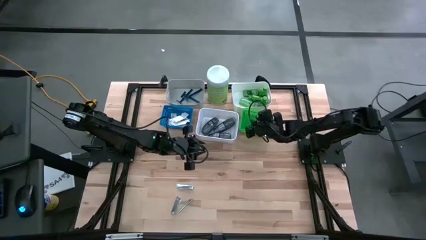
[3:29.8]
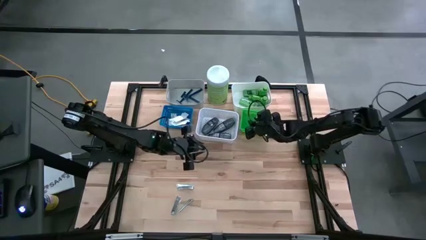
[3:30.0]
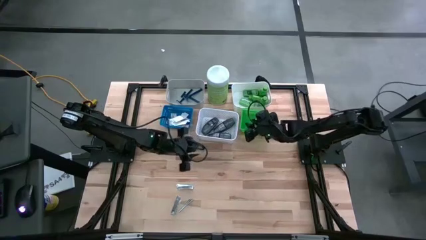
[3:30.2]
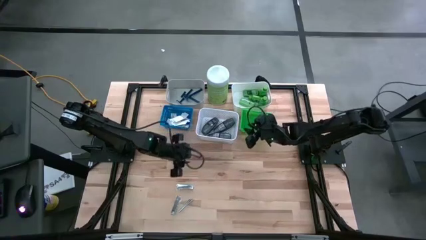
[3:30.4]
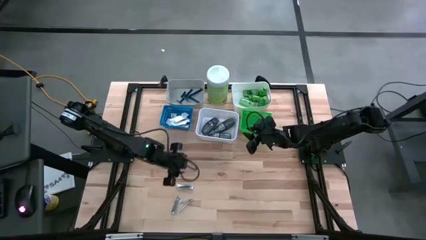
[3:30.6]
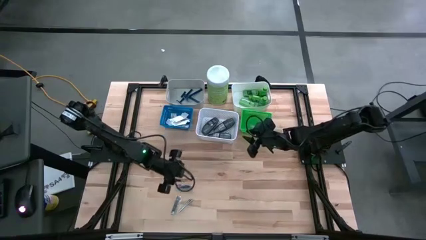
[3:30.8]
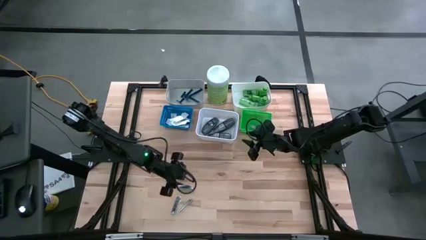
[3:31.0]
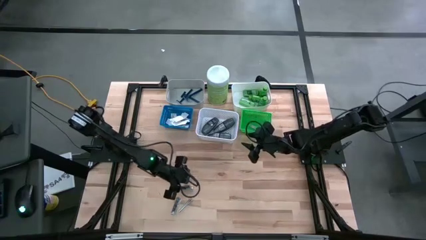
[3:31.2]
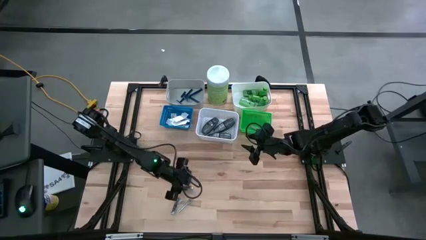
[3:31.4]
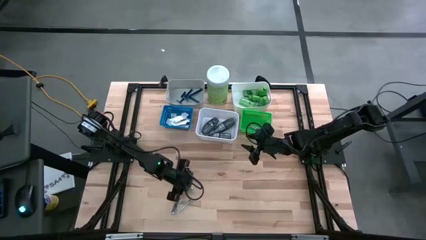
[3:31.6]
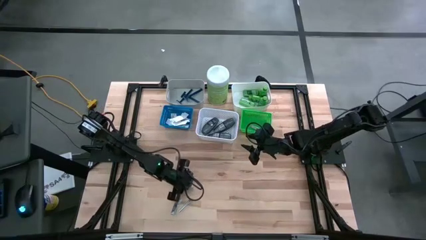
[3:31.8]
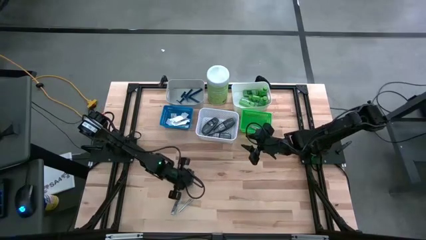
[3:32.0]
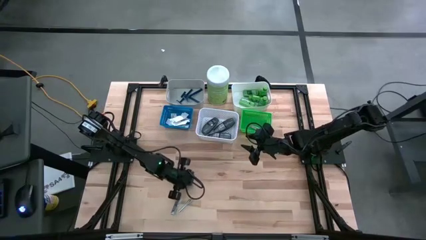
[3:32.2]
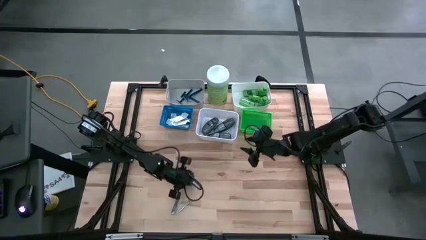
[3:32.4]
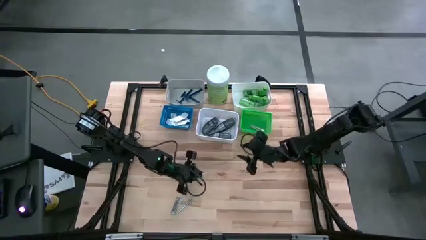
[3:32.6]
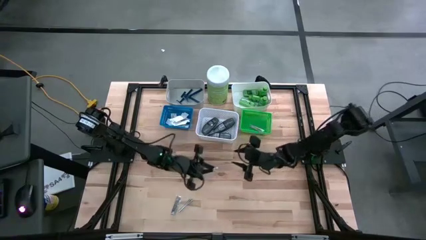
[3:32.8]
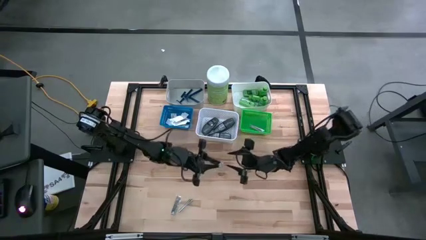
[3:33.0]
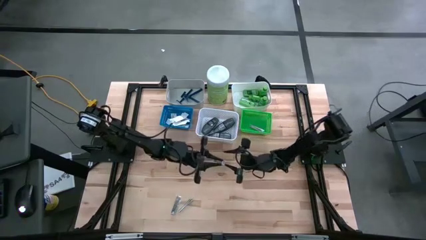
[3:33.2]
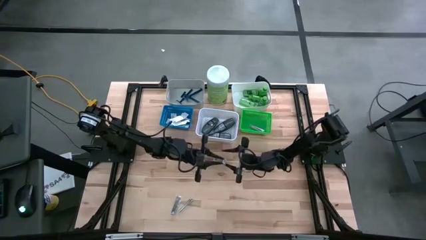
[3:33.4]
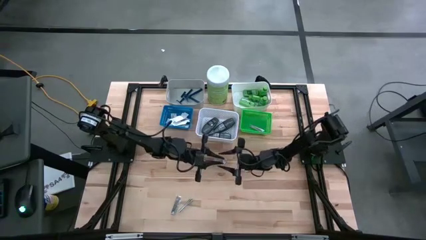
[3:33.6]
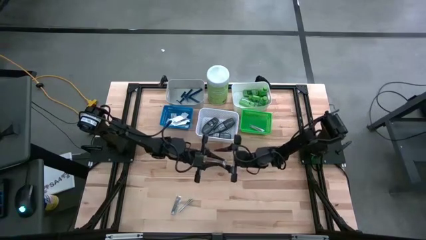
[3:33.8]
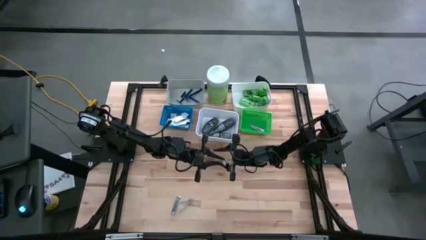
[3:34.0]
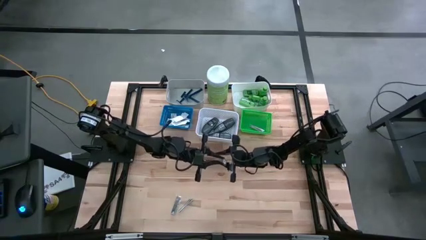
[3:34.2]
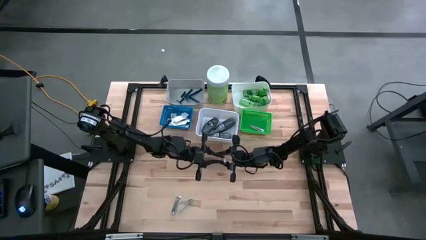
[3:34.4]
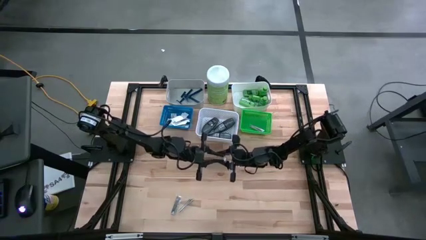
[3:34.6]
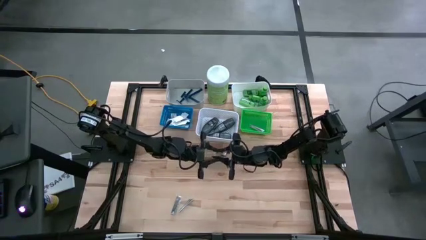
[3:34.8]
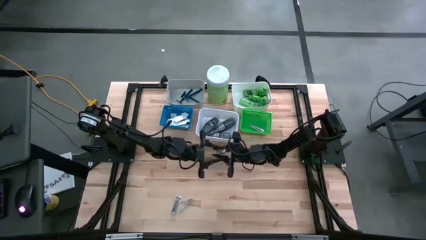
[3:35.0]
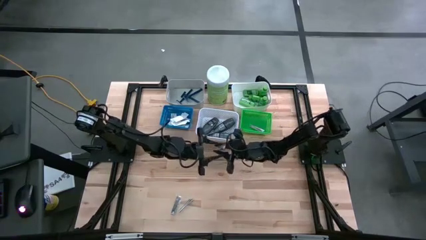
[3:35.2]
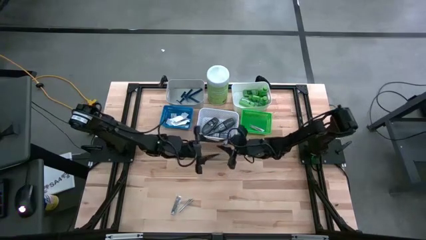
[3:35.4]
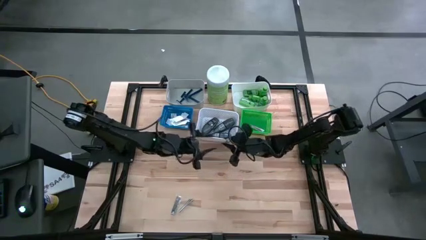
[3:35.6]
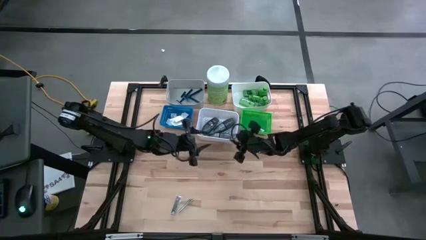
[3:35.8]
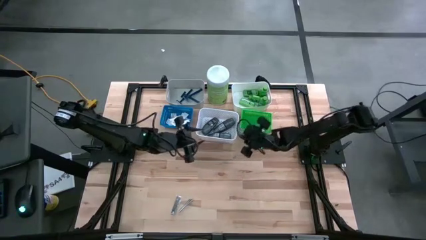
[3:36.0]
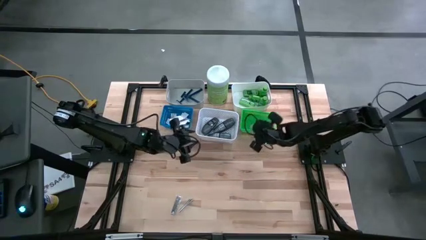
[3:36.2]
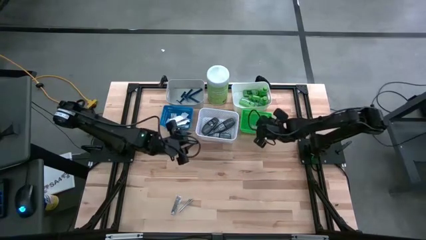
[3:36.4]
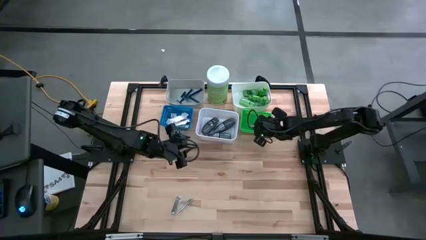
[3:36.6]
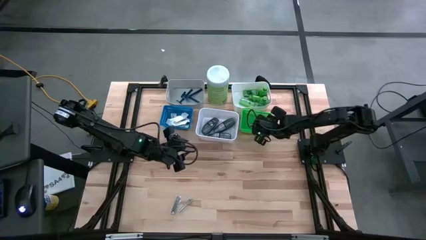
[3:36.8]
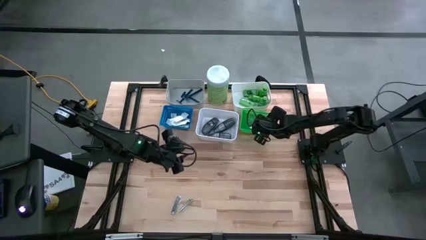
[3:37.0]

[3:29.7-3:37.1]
Task: Pick & Place Travel size toiletries
Put the silver nail cutter into the green bin

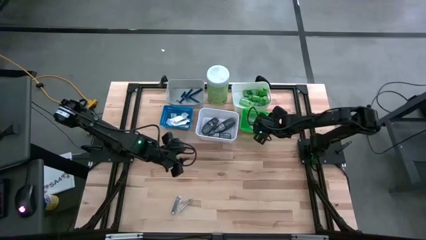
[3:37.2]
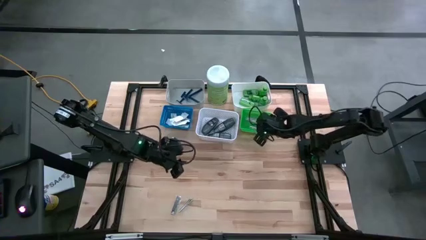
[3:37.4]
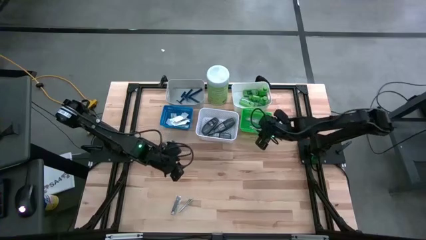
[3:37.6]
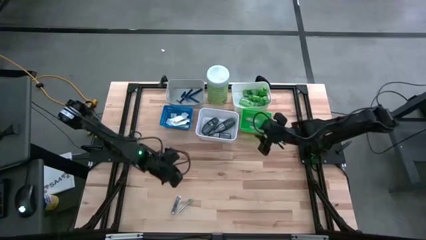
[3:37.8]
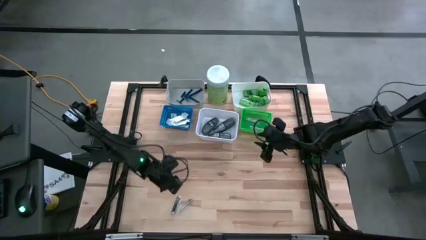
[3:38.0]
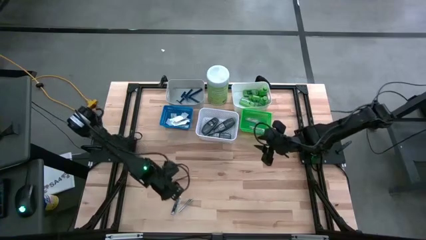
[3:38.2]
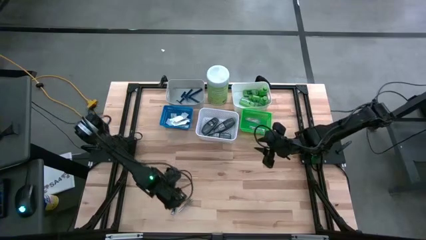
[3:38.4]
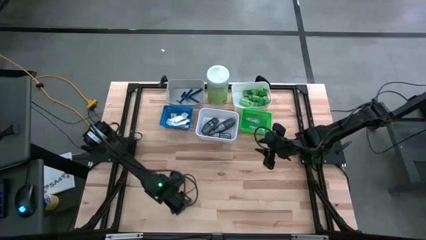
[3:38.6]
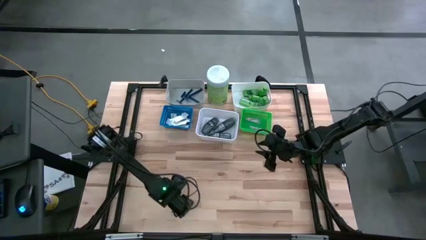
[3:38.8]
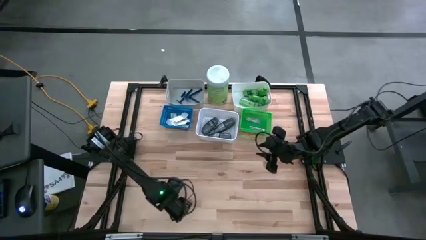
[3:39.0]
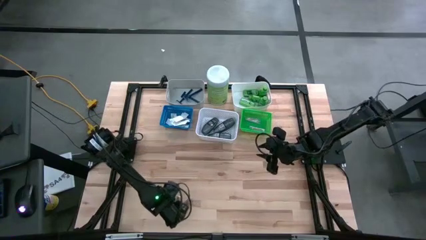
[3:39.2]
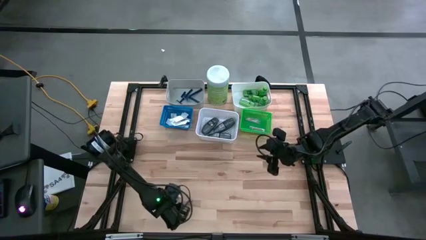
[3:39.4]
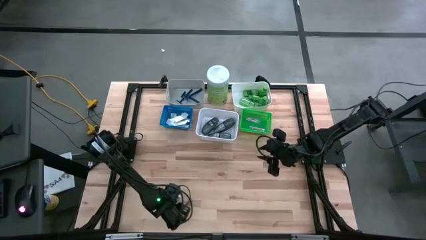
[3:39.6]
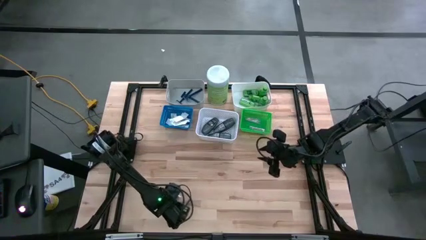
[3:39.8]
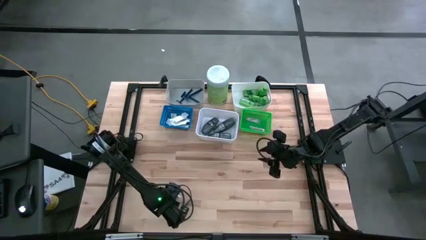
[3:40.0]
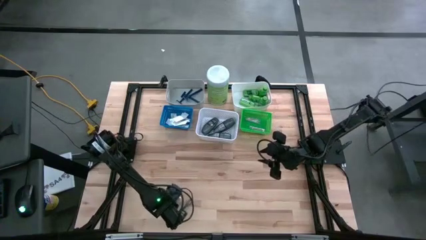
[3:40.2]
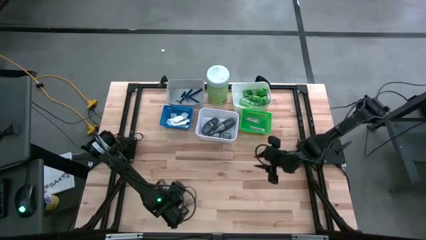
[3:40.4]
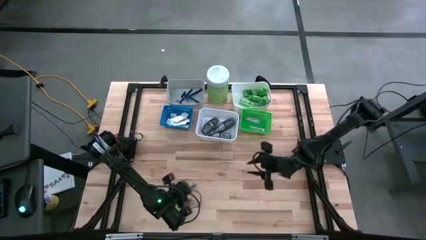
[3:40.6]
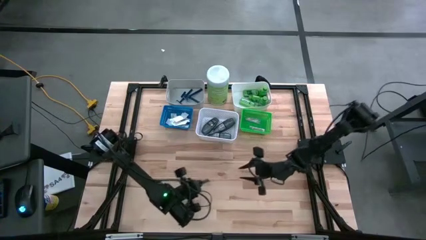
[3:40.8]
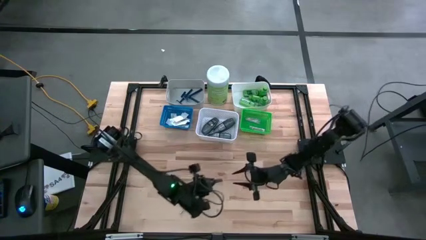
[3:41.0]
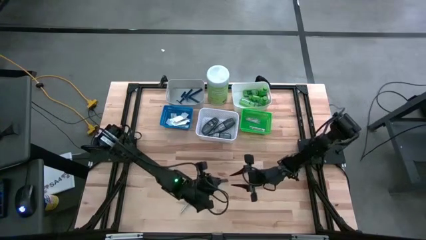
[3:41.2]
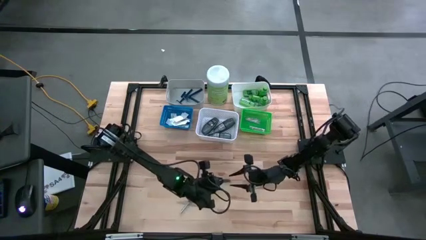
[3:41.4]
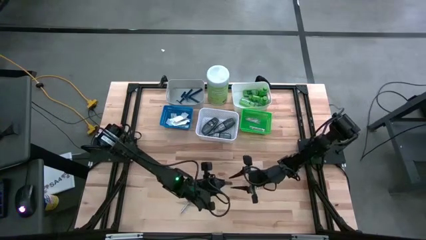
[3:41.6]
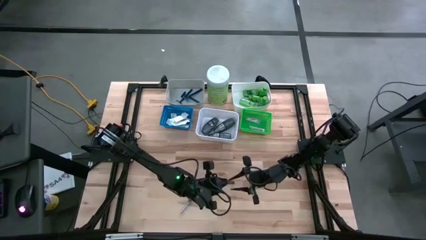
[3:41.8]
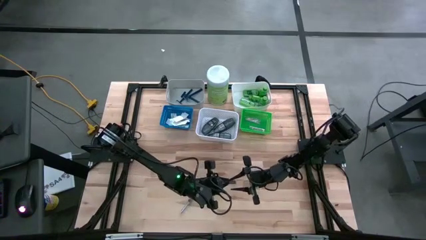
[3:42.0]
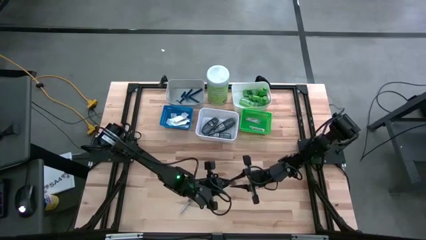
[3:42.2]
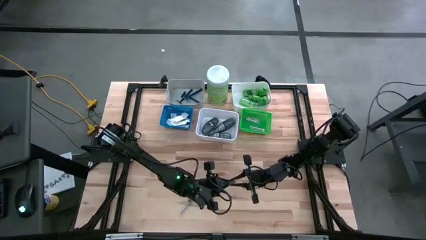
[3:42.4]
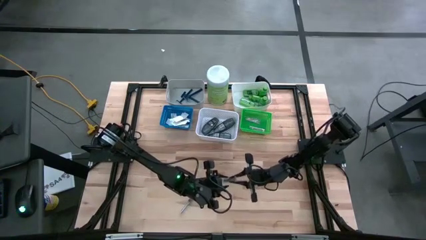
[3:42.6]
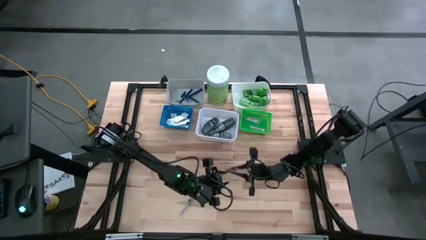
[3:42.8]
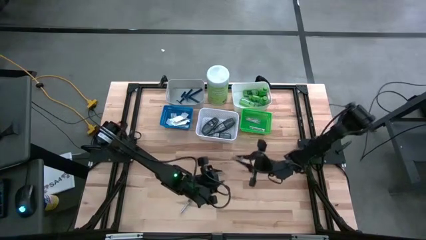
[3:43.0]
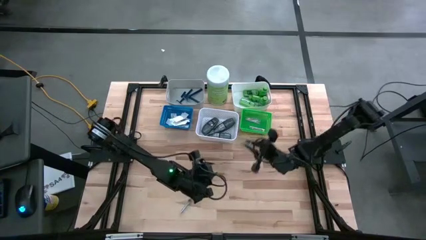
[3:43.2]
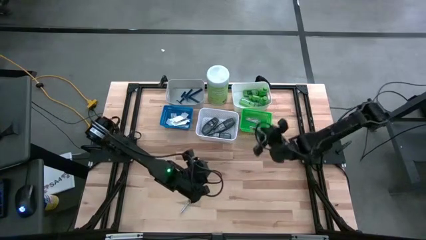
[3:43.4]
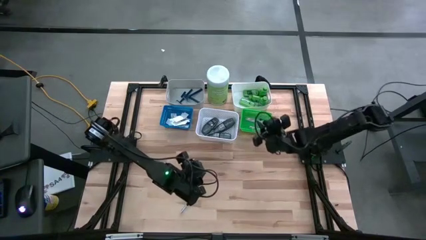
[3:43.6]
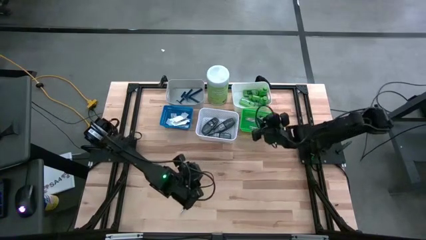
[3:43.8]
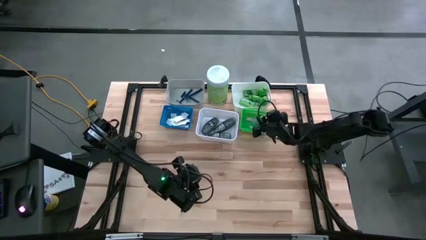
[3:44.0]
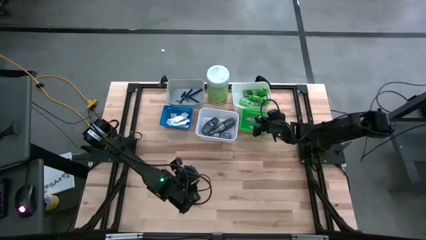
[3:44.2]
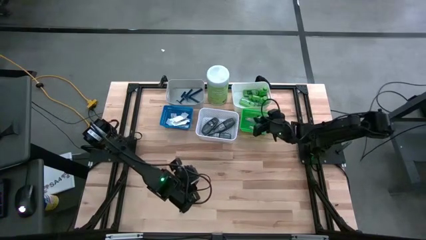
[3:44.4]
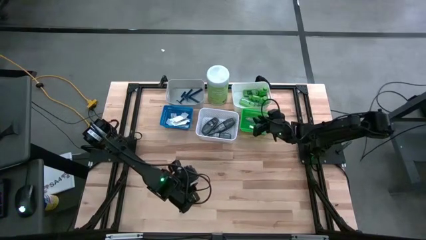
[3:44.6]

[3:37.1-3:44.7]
Put the silver nail cutter into the green bin
